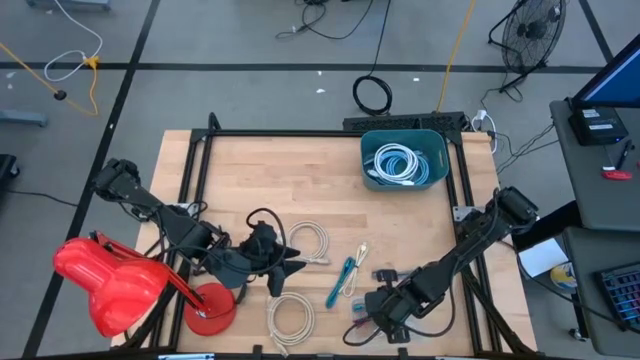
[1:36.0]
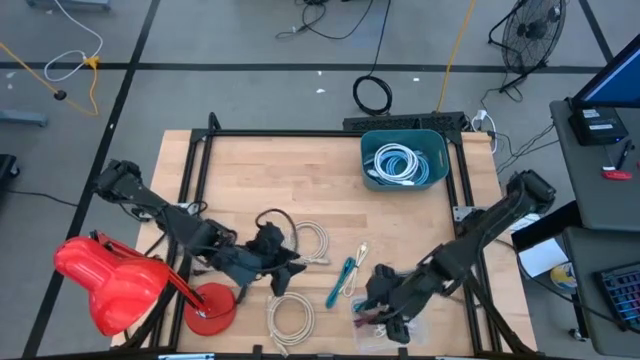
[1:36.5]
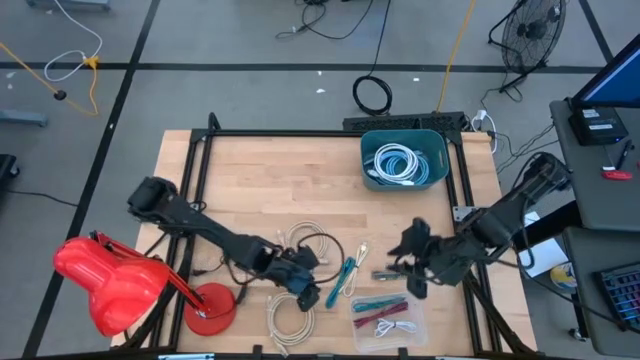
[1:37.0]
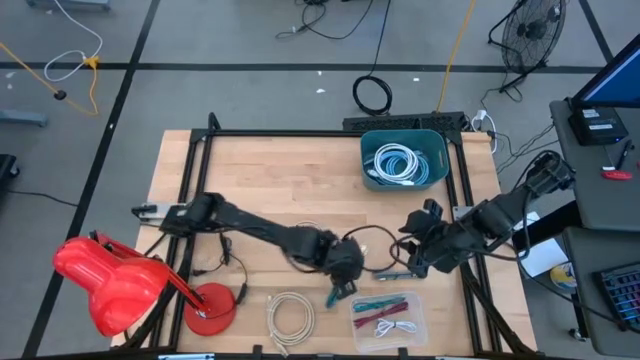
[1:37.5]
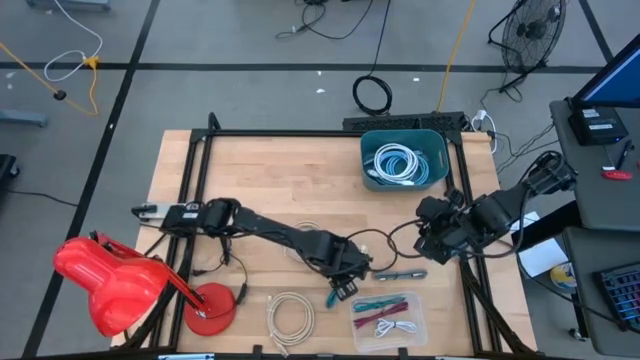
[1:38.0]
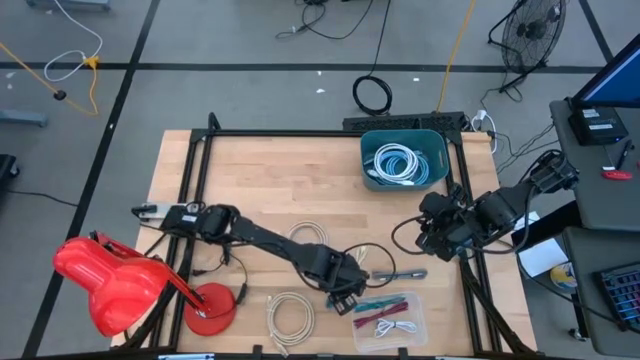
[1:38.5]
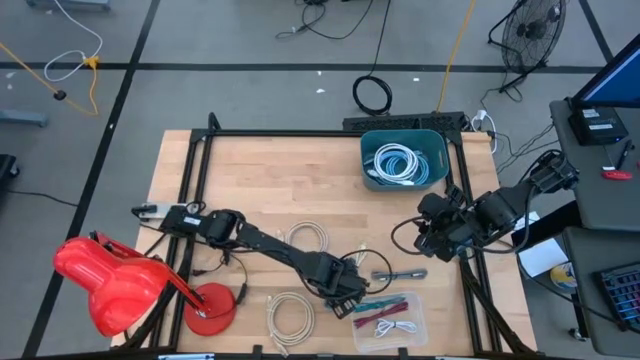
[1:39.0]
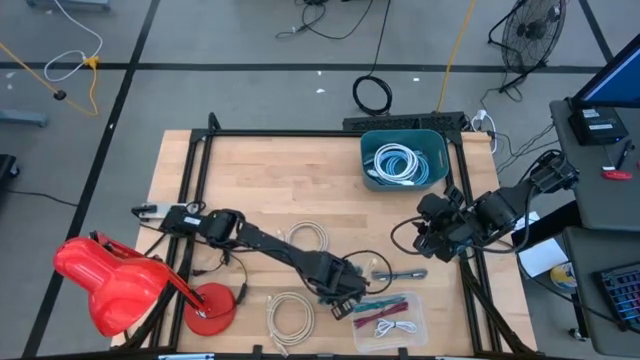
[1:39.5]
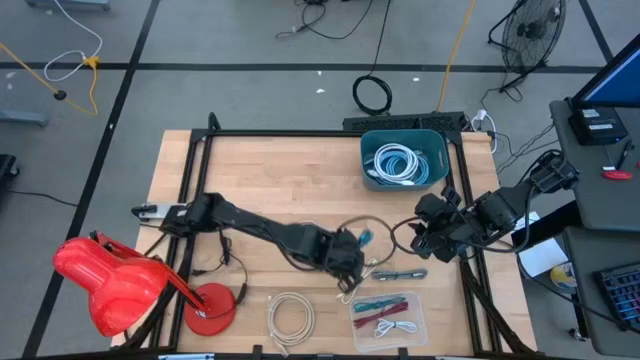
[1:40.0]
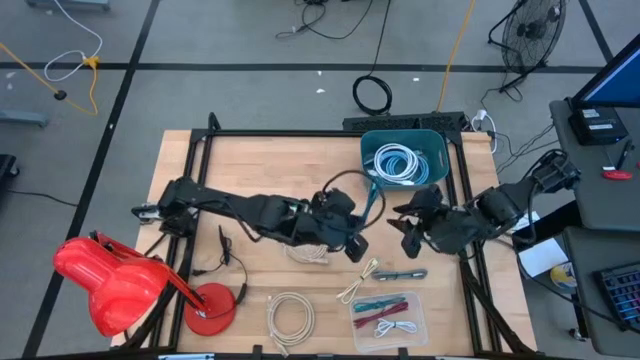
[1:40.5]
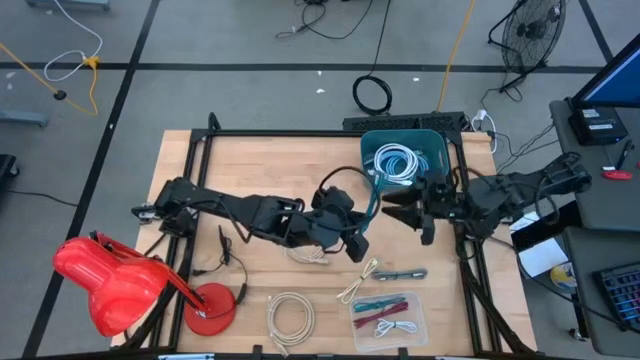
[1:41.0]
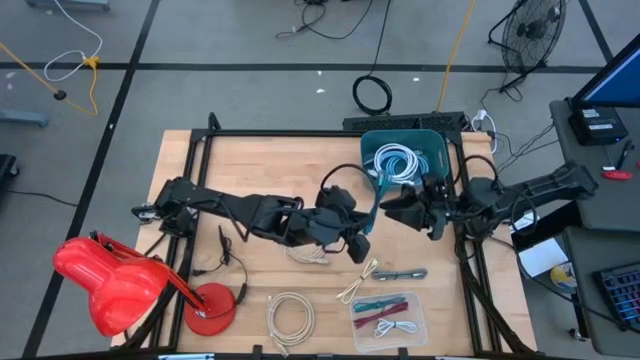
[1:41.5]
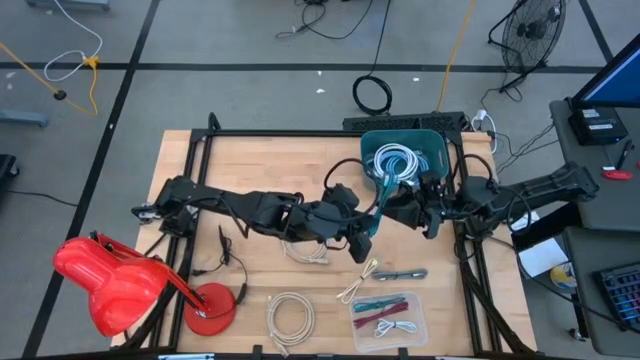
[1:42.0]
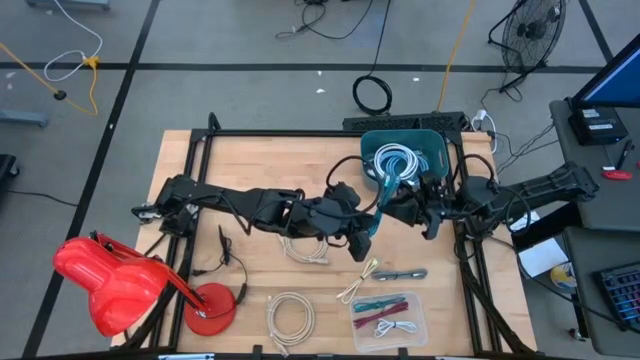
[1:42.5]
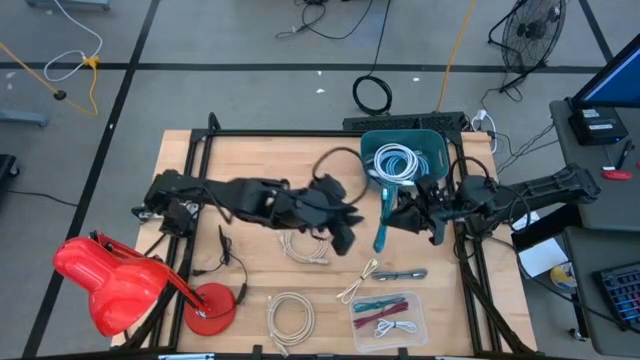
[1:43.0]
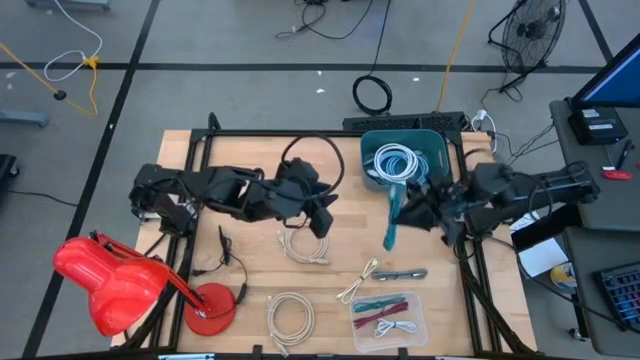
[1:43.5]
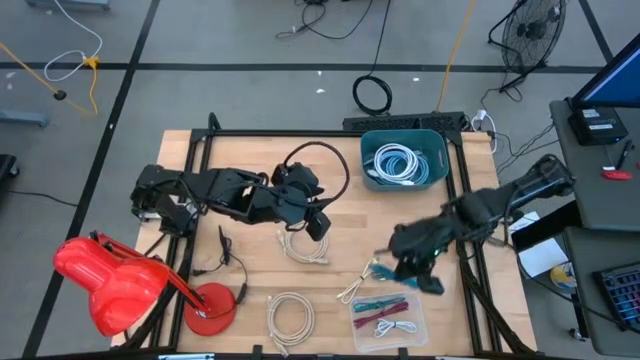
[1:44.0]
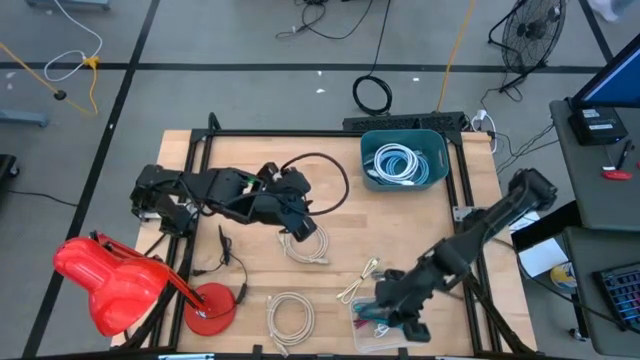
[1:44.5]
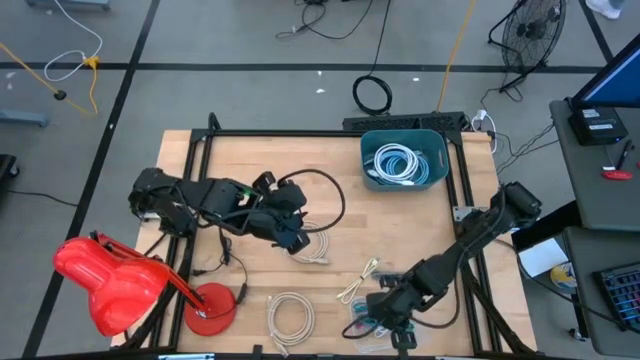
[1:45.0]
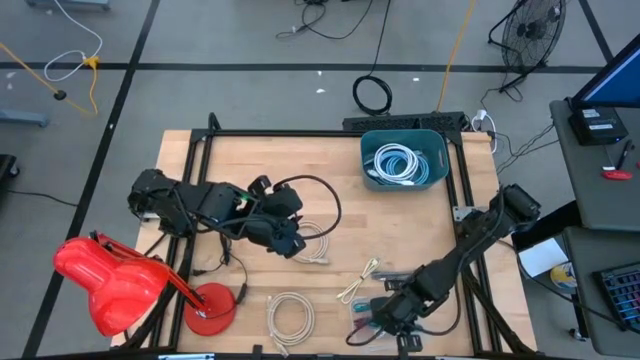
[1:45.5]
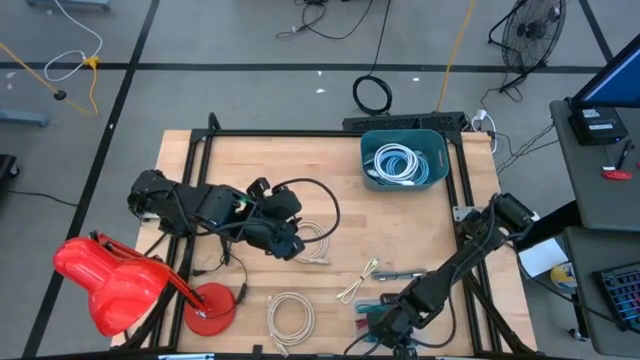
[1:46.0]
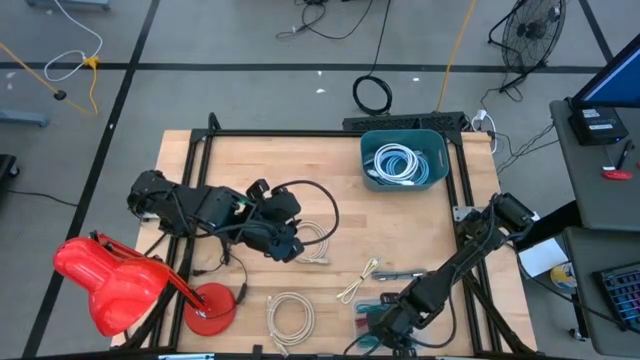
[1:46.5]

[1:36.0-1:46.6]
Task: Pick & Place USB Port
Put the blue charger cable into the transparent bin

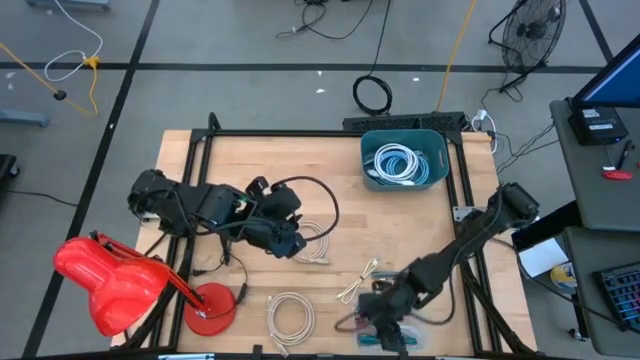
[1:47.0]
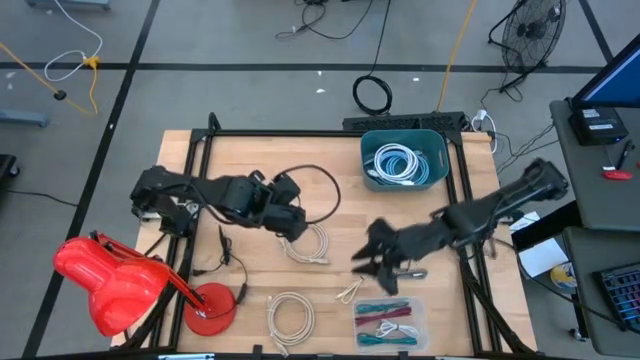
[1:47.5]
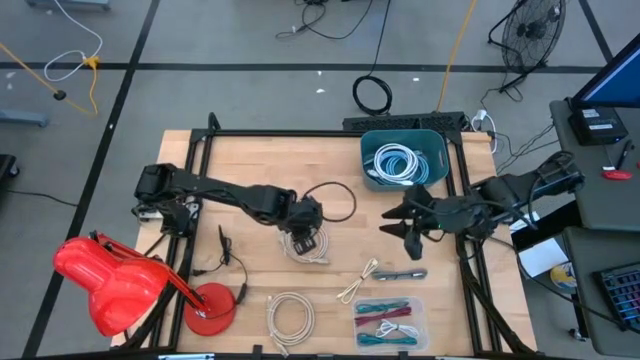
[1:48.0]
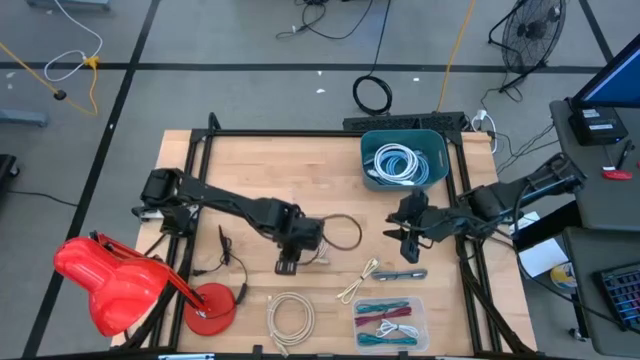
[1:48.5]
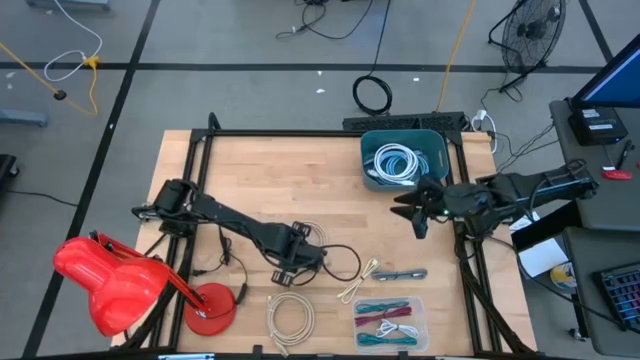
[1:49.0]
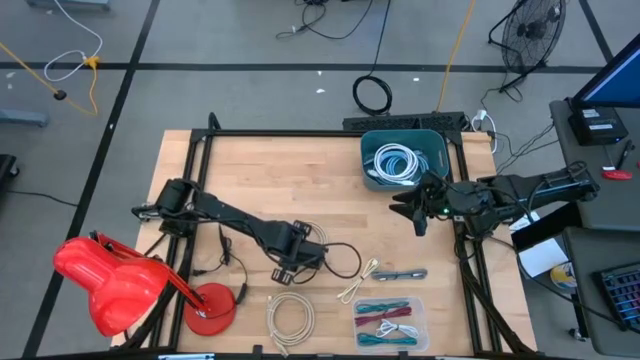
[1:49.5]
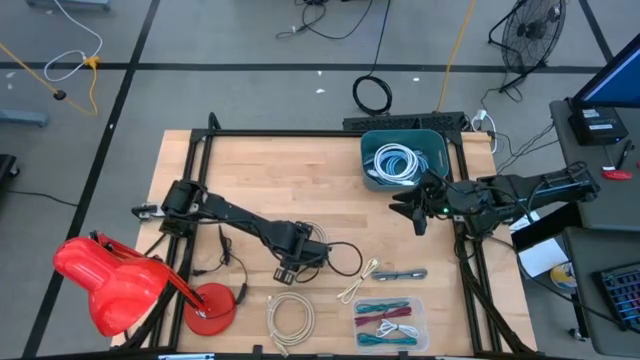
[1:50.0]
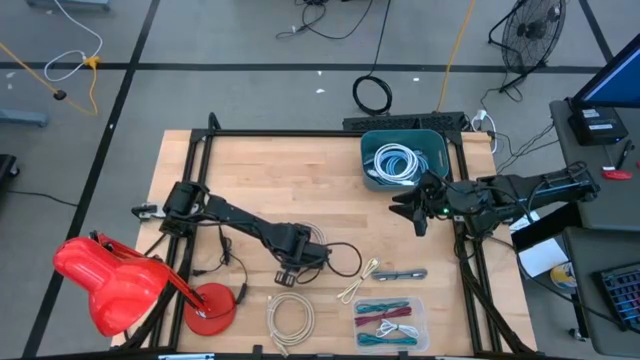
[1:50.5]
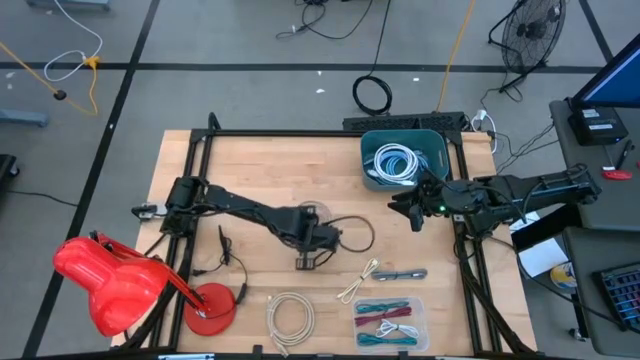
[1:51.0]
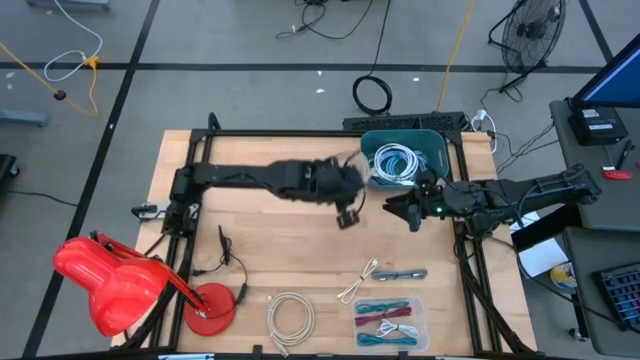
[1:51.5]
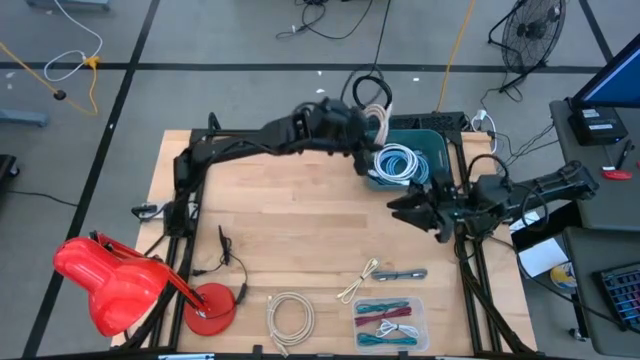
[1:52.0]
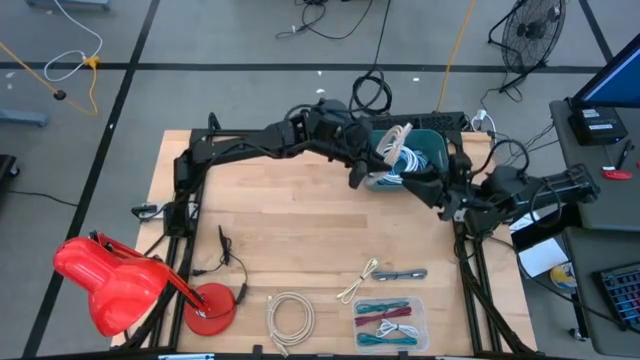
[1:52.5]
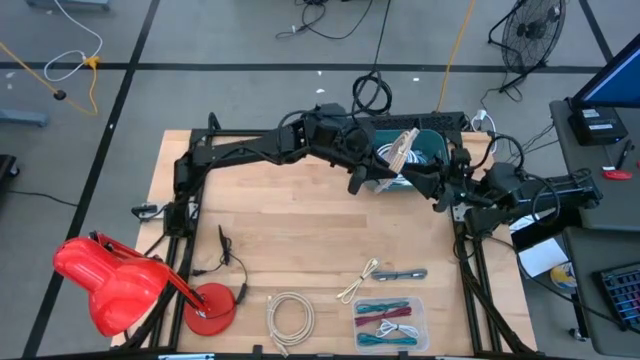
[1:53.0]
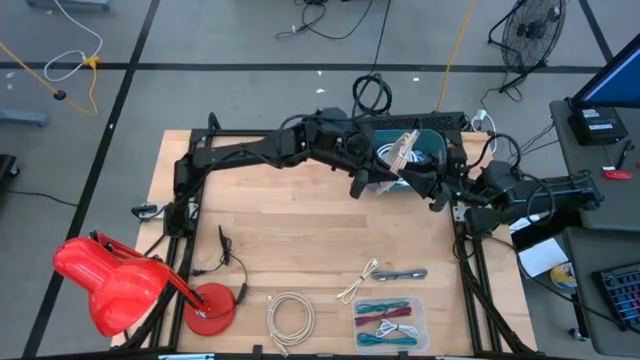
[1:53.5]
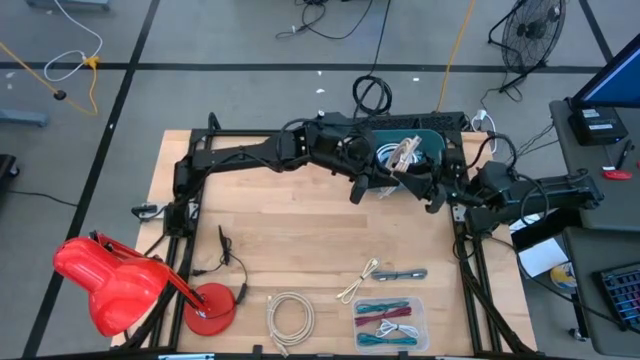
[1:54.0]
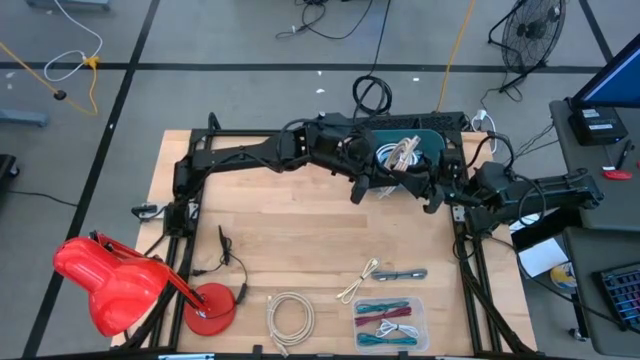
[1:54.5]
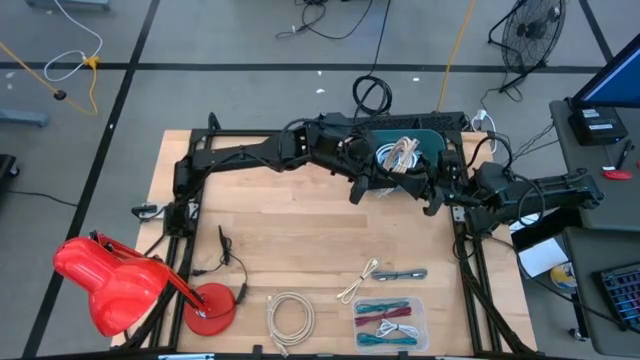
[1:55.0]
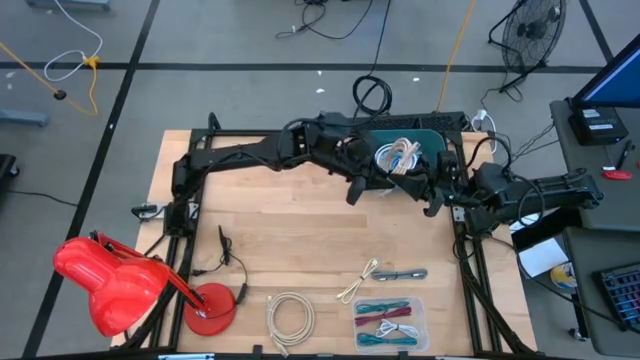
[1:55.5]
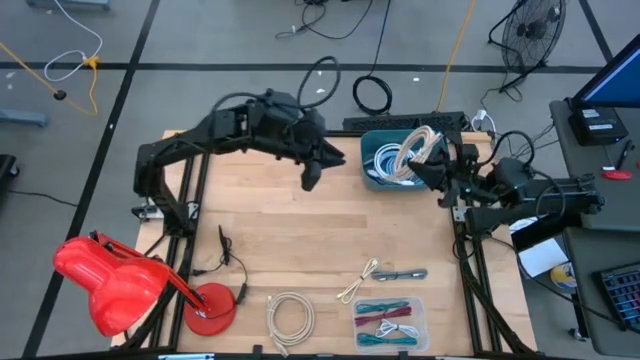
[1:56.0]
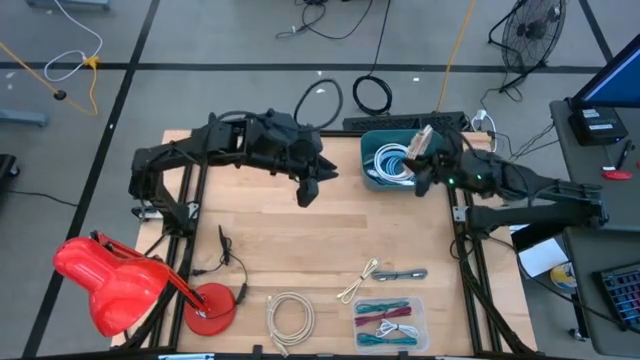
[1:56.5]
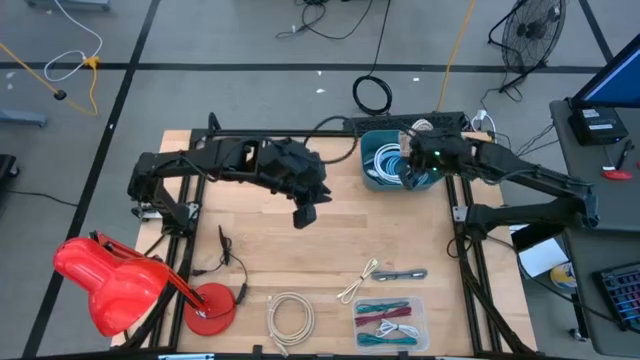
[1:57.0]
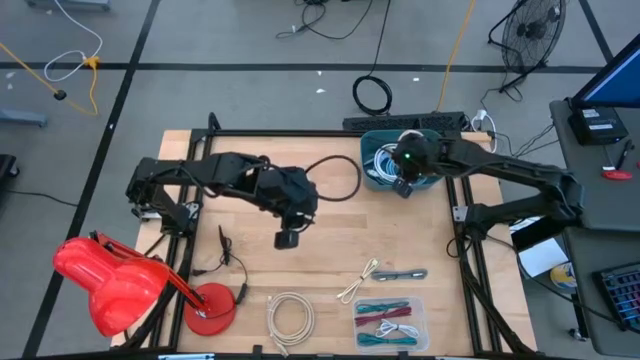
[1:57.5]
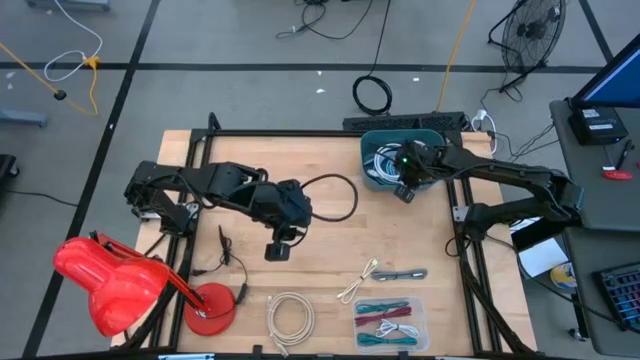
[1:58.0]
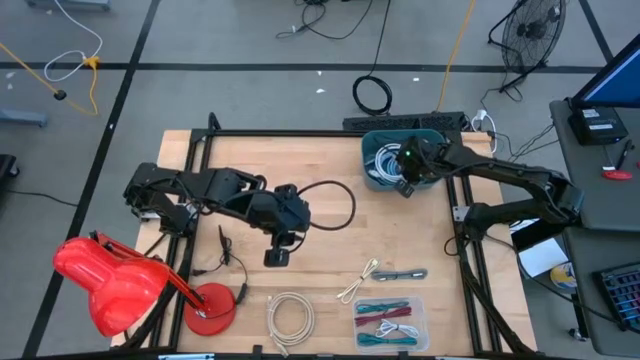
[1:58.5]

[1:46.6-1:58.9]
Put the top brown HDMI cable into the blue bin
